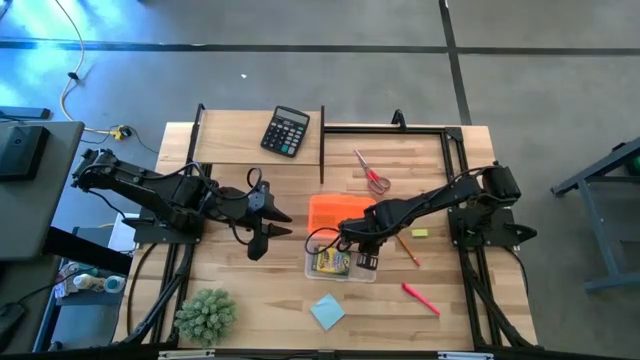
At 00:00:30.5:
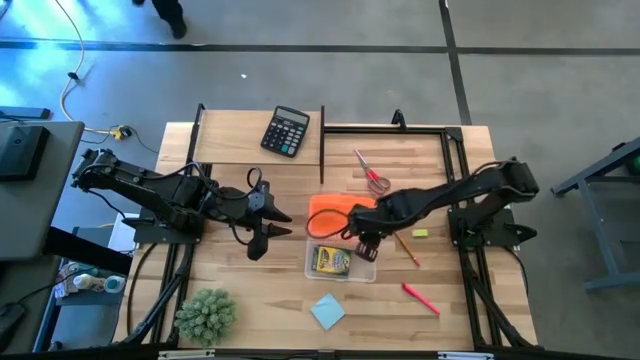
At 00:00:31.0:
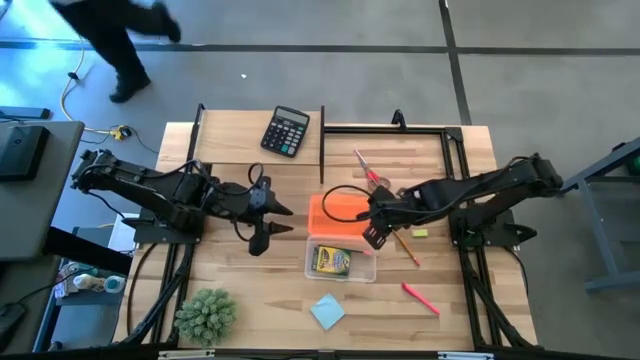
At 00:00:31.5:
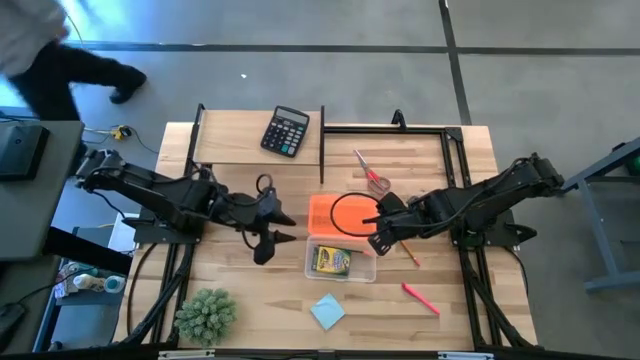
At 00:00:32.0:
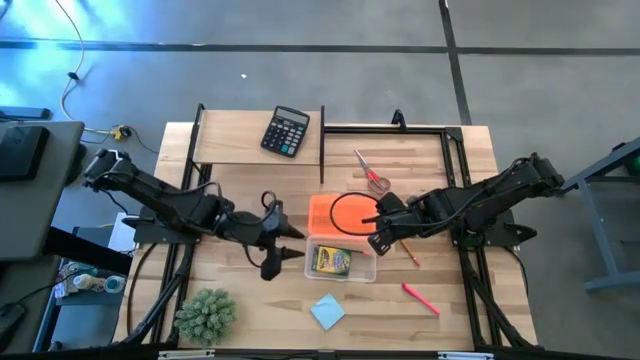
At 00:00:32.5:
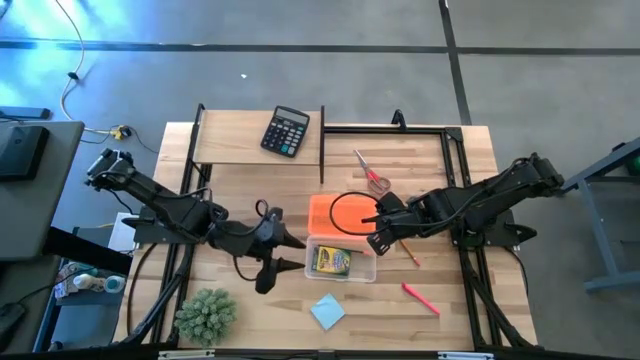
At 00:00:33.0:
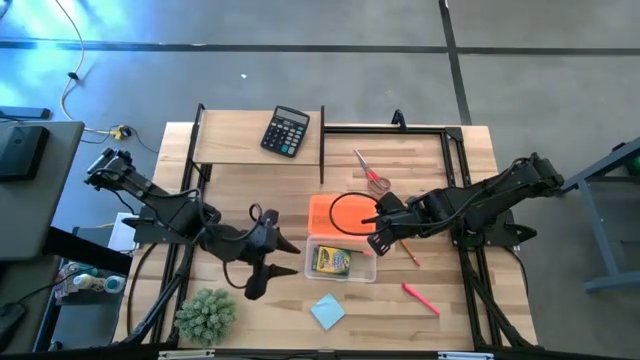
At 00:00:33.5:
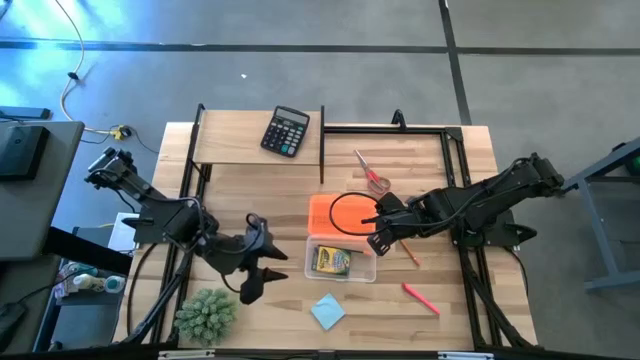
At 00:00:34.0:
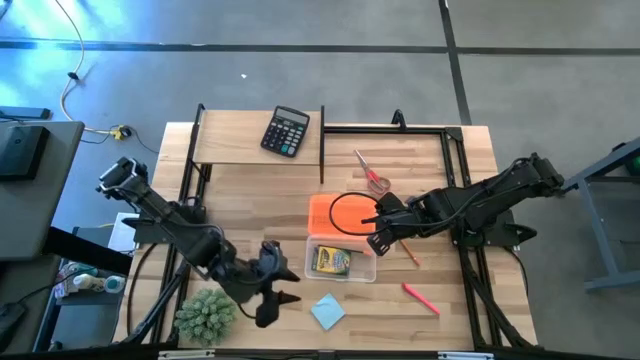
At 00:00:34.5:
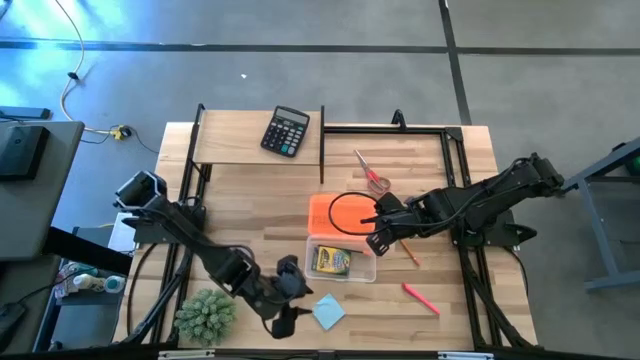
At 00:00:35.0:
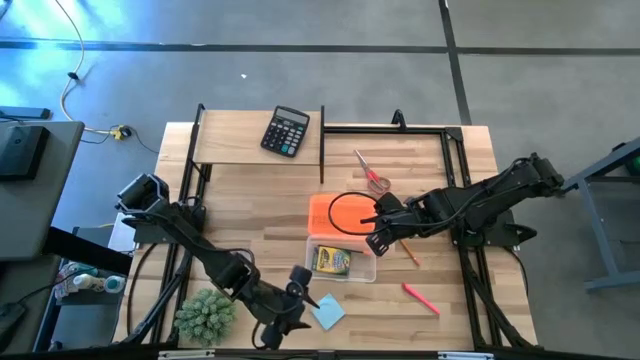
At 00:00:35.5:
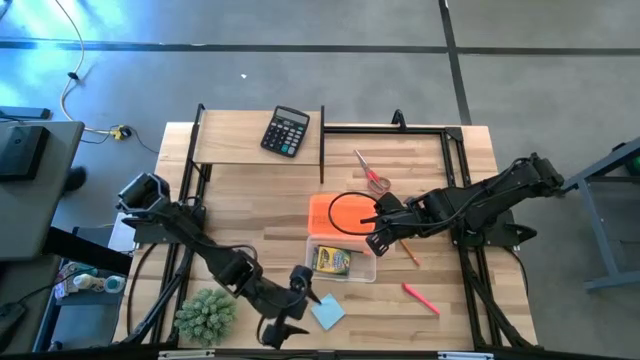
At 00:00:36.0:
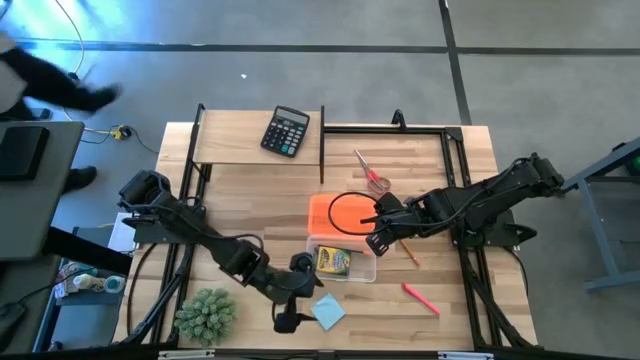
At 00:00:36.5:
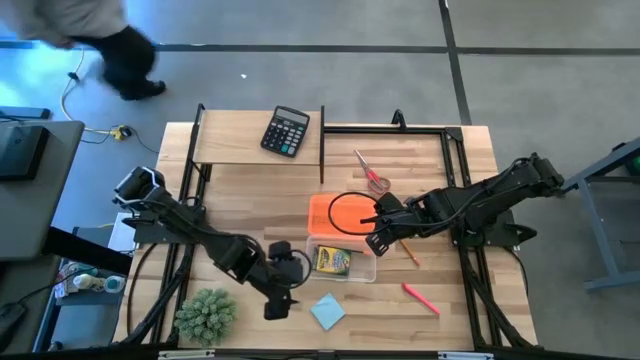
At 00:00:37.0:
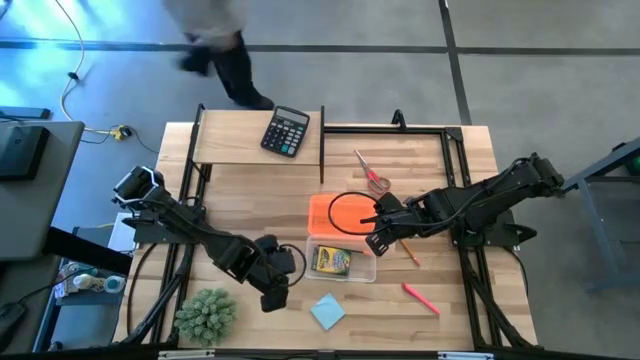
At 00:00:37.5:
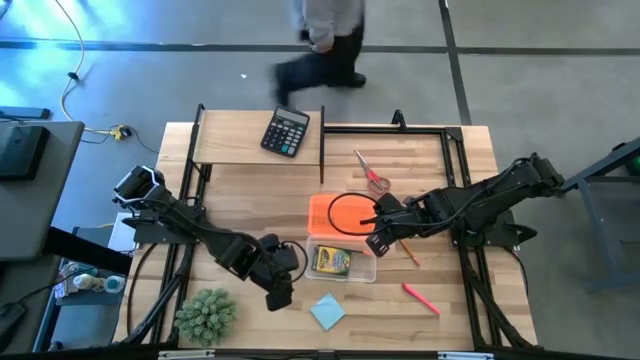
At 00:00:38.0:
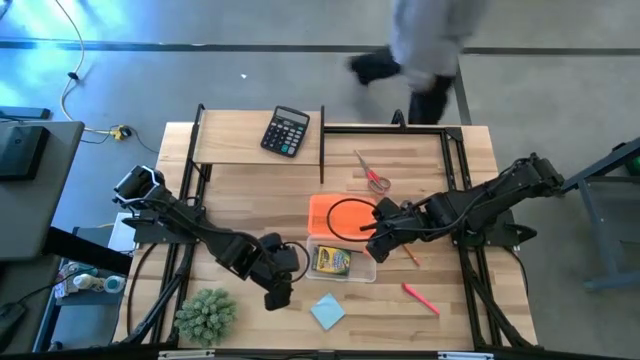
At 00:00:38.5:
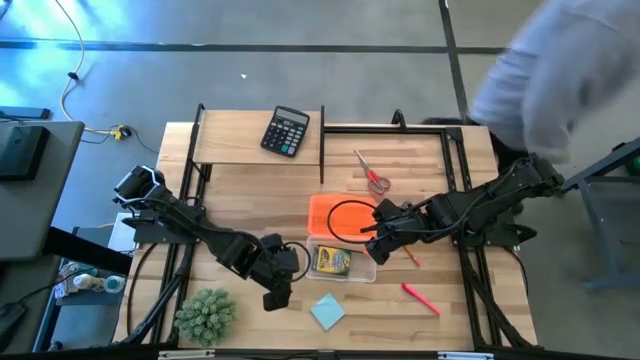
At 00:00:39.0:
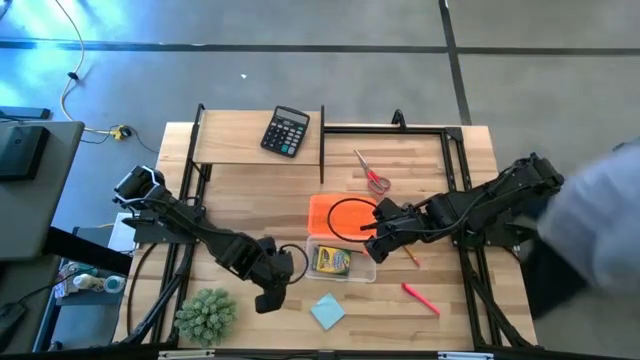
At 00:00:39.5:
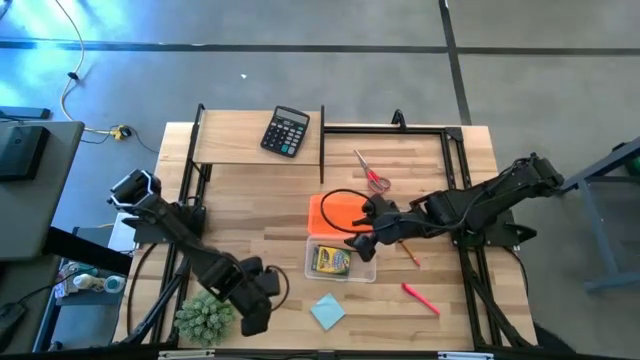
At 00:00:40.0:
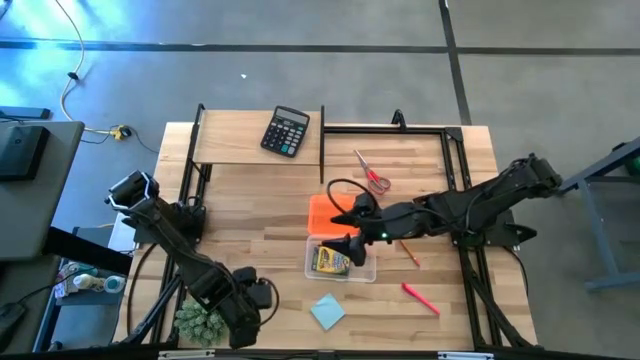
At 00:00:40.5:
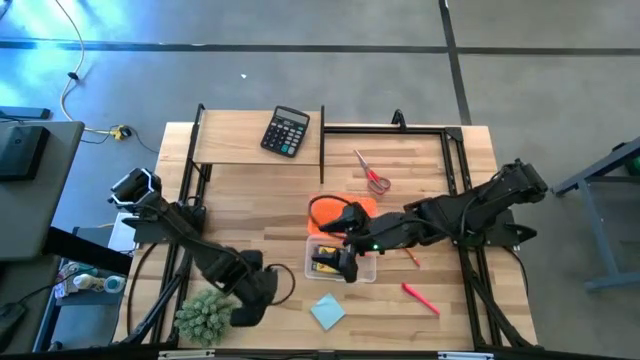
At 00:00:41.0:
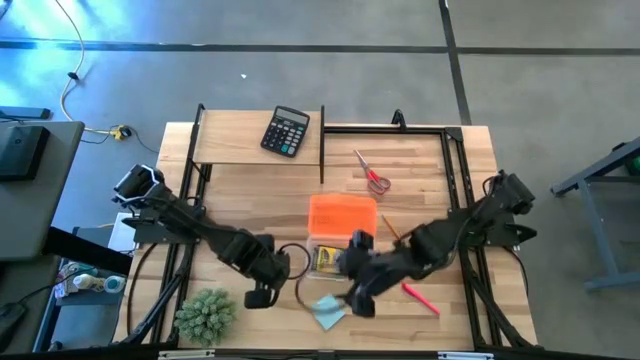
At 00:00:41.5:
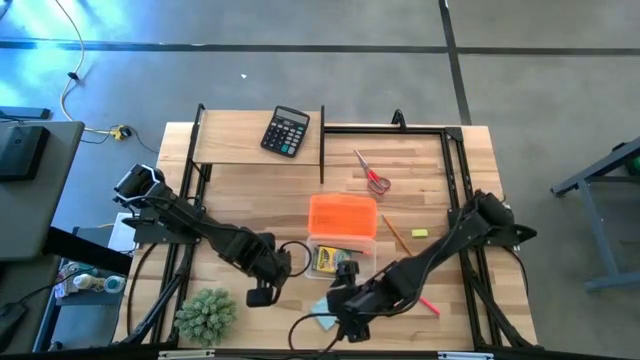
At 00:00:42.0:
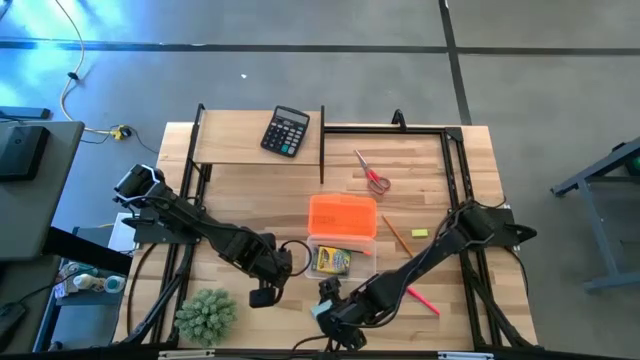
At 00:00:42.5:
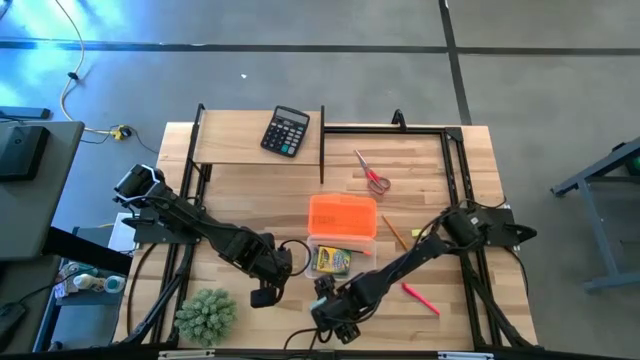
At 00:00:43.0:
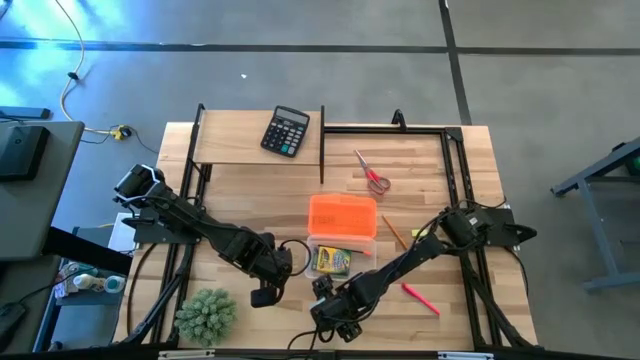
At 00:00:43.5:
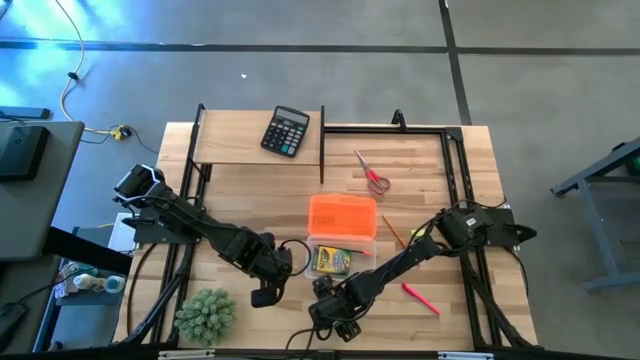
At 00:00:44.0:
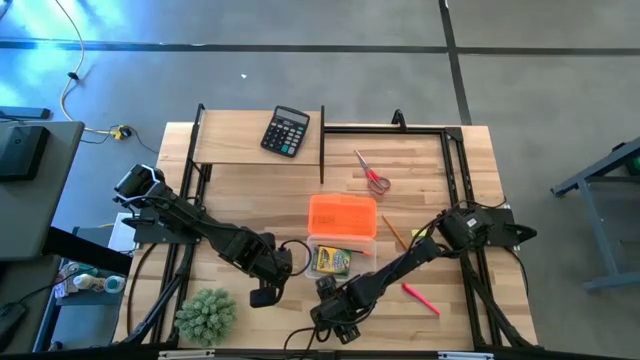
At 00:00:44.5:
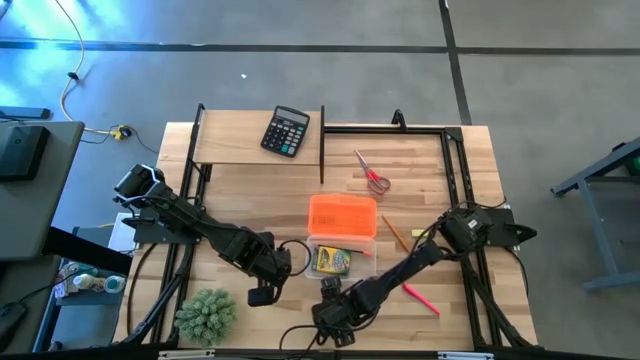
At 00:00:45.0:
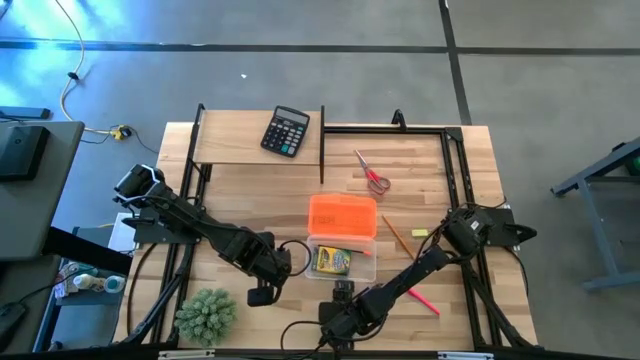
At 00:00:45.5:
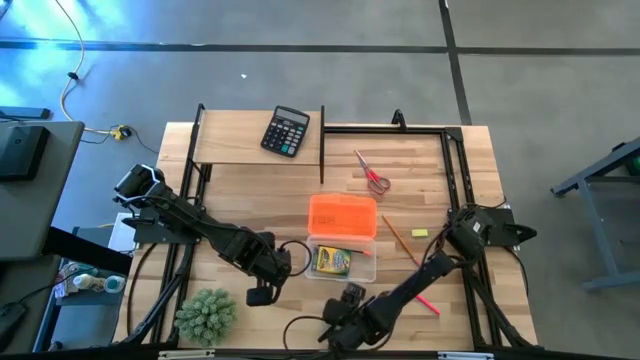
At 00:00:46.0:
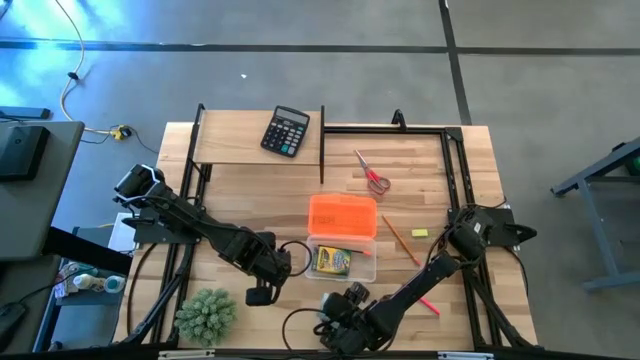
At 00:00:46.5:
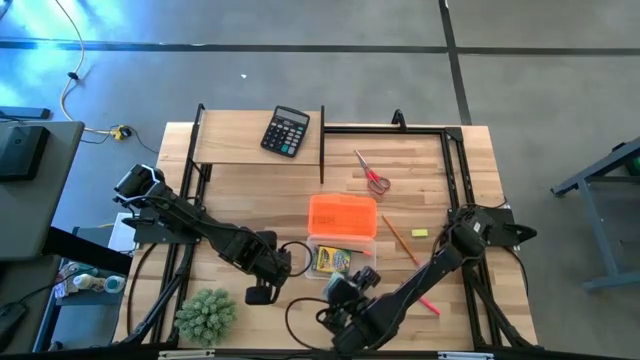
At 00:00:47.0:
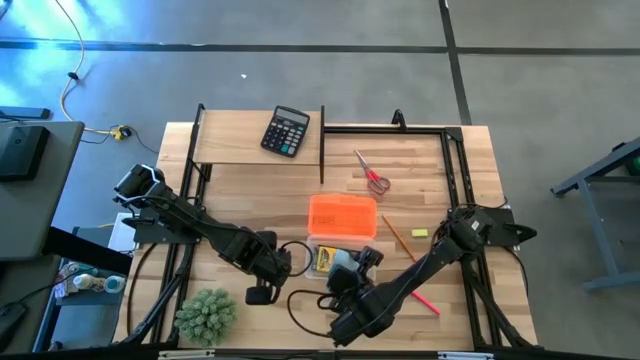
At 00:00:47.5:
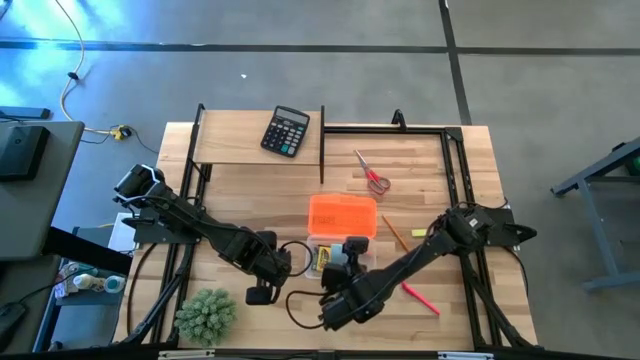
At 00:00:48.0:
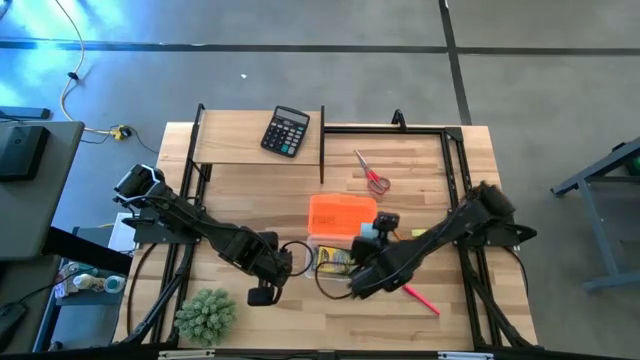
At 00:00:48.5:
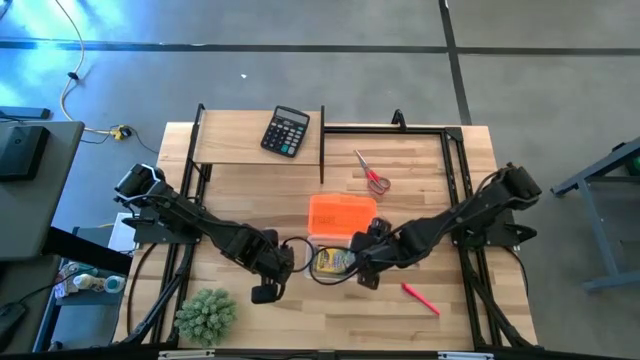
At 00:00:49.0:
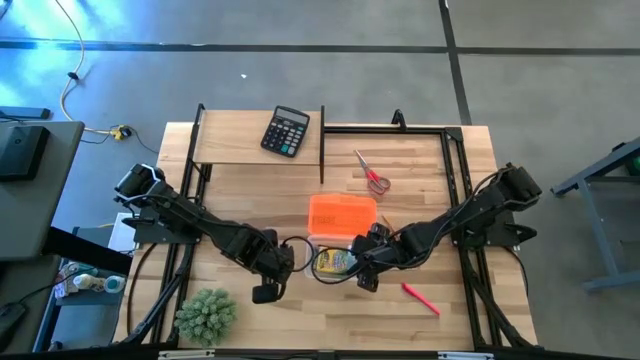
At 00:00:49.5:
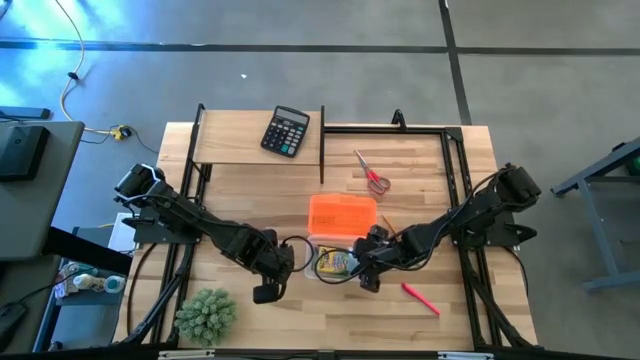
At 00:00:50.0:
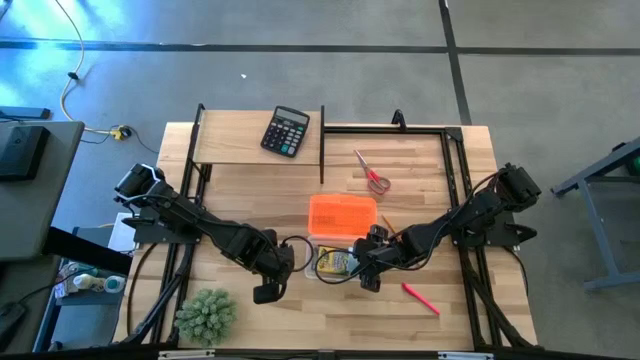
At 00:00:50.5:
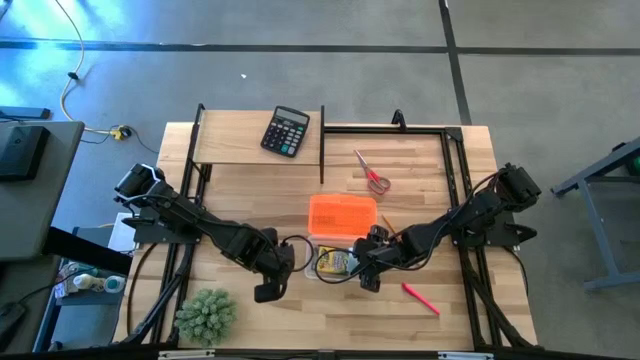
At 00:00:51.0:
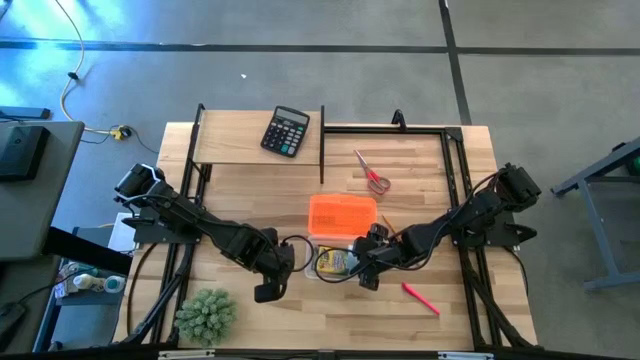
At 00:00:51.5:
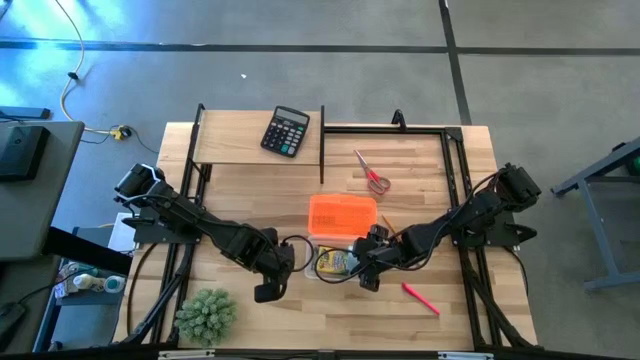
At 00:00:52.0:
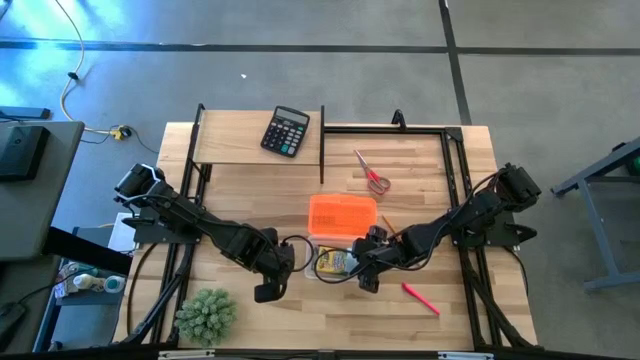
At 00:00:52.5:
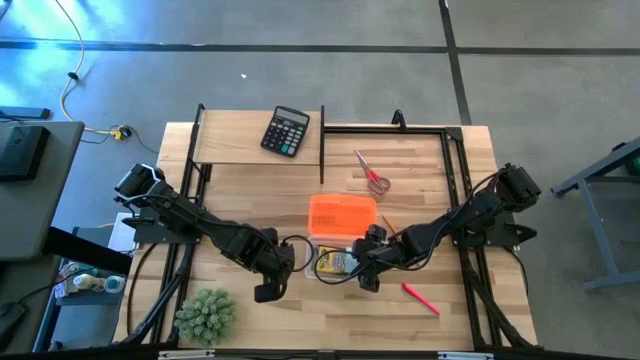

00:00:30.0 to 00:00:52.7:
Task: Pack school essentials
Put the blue sticky notes into the supply box
